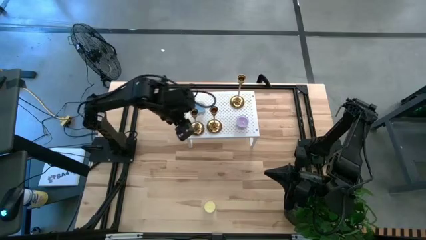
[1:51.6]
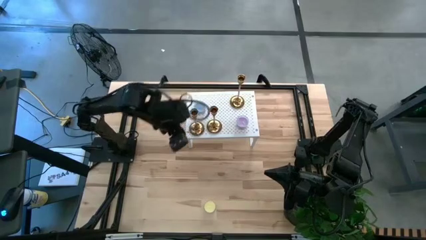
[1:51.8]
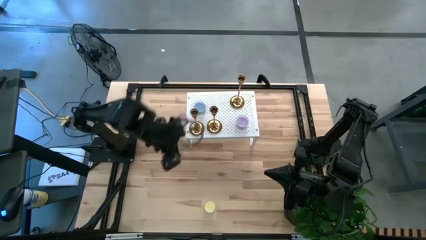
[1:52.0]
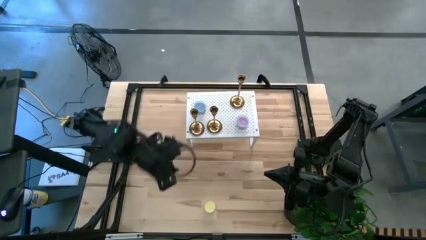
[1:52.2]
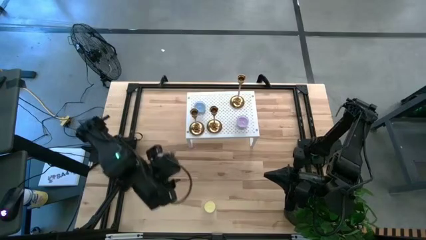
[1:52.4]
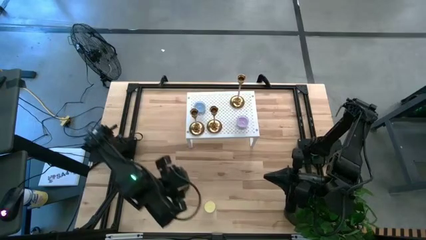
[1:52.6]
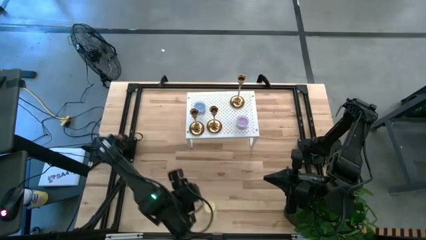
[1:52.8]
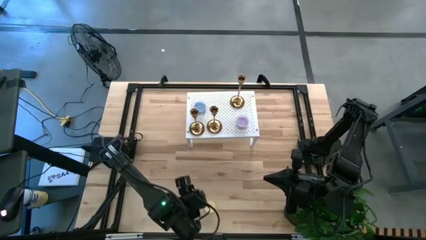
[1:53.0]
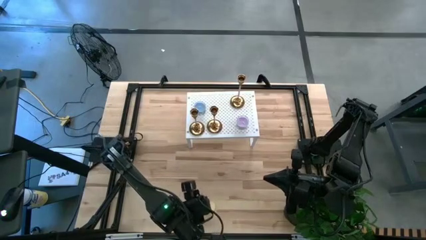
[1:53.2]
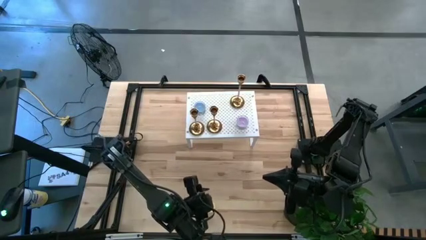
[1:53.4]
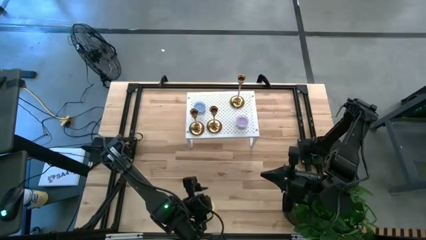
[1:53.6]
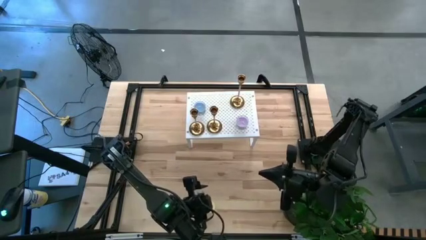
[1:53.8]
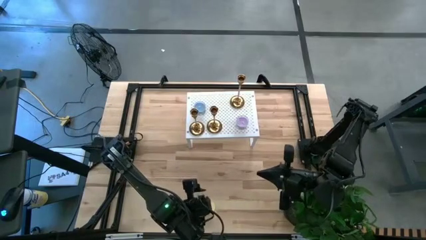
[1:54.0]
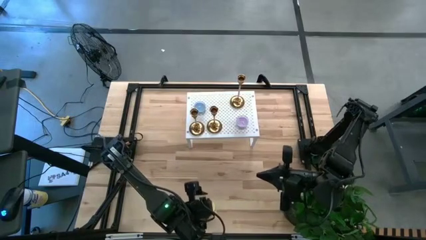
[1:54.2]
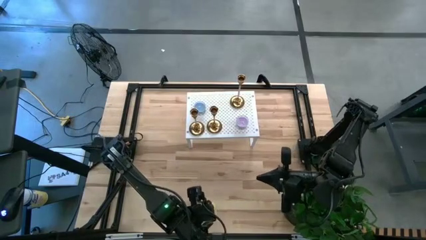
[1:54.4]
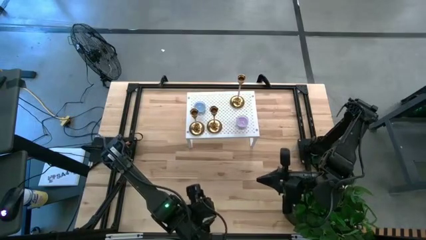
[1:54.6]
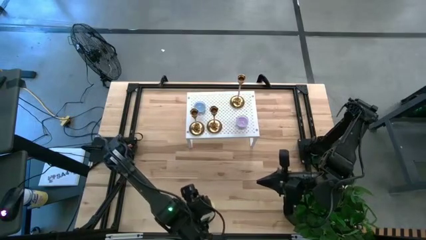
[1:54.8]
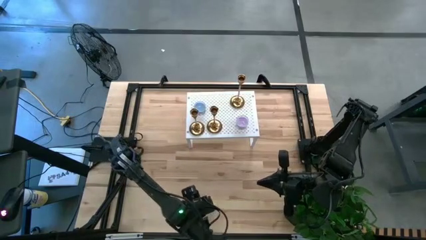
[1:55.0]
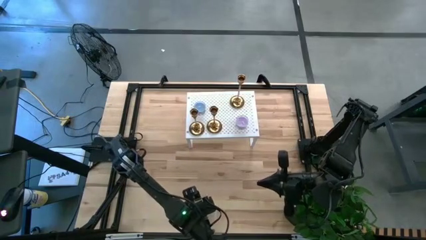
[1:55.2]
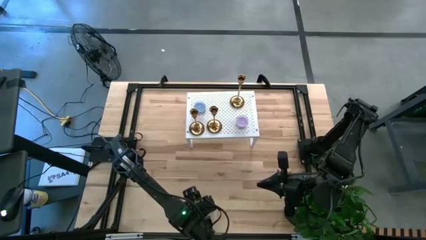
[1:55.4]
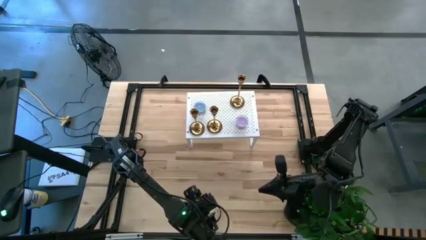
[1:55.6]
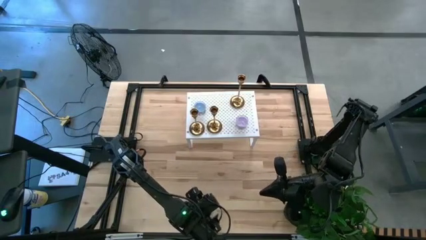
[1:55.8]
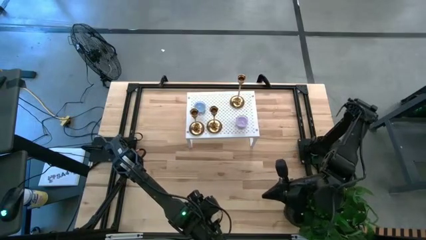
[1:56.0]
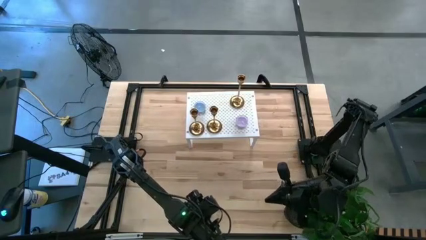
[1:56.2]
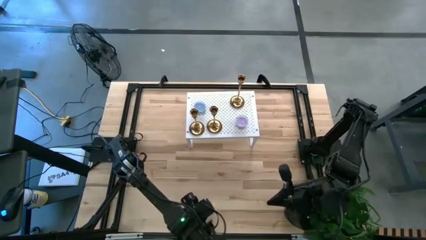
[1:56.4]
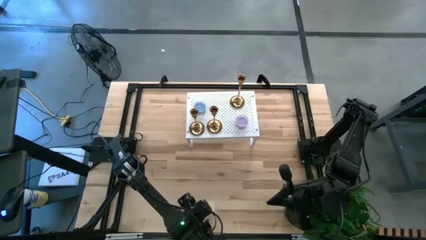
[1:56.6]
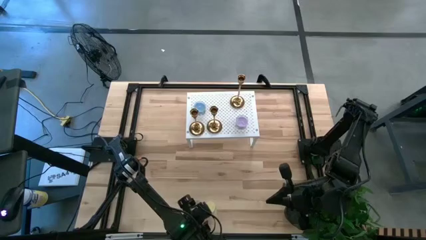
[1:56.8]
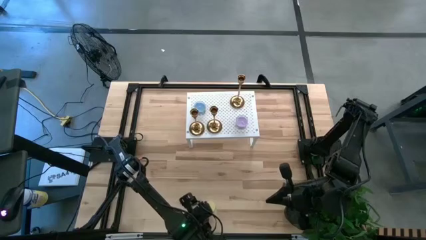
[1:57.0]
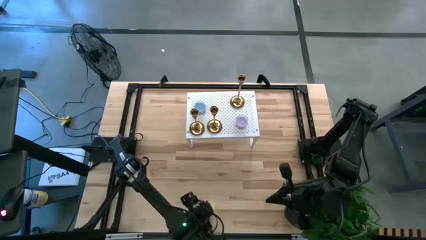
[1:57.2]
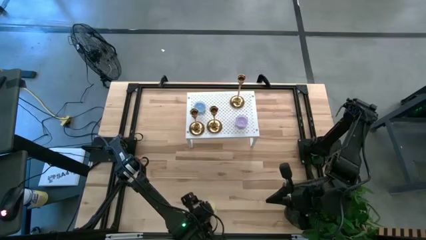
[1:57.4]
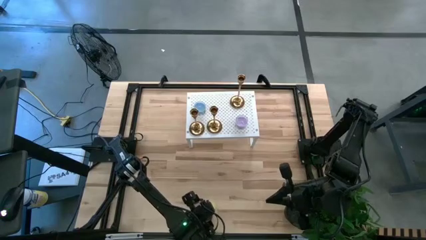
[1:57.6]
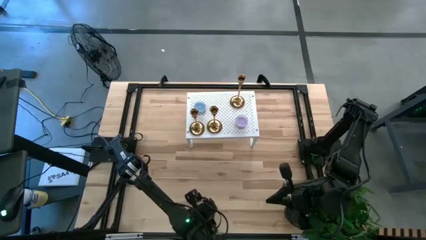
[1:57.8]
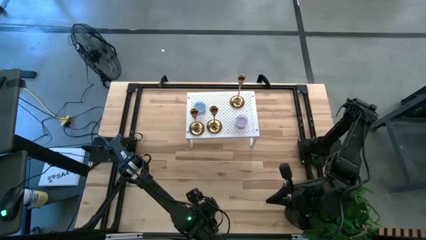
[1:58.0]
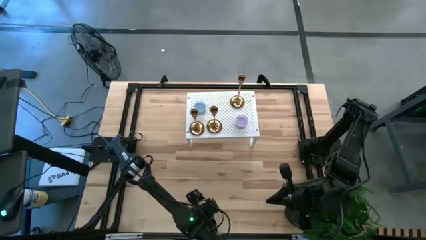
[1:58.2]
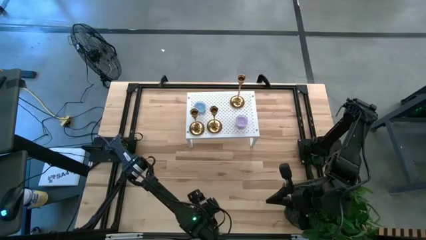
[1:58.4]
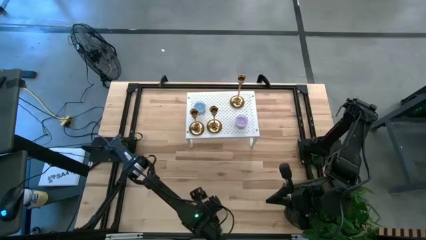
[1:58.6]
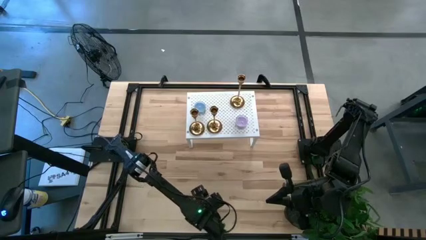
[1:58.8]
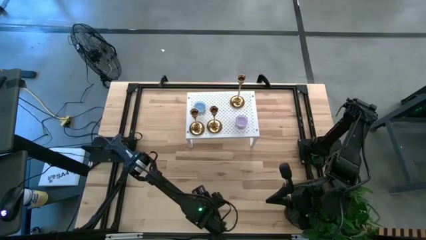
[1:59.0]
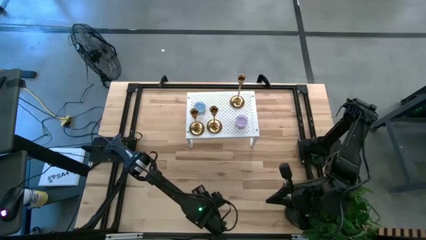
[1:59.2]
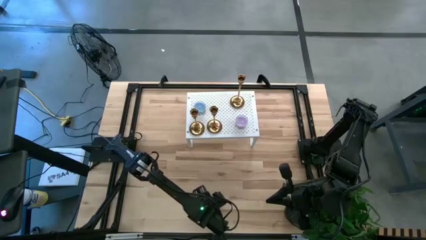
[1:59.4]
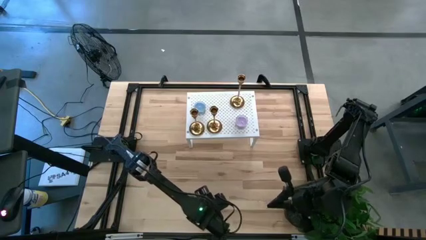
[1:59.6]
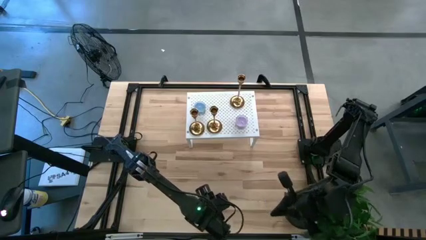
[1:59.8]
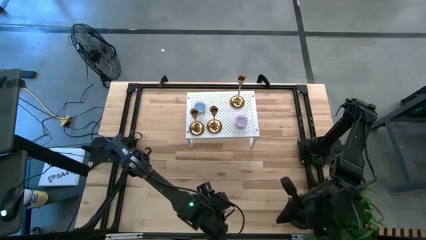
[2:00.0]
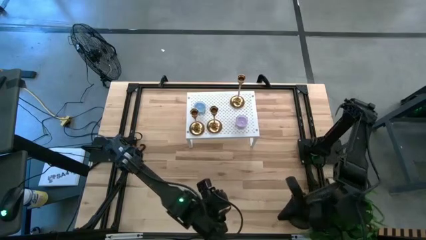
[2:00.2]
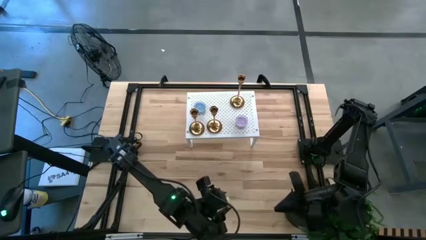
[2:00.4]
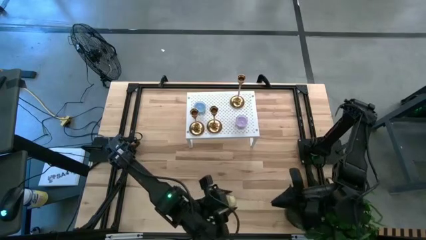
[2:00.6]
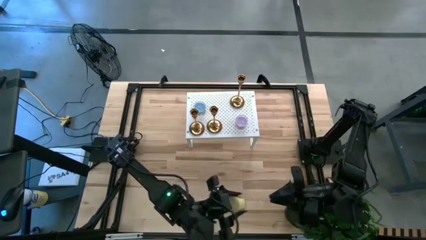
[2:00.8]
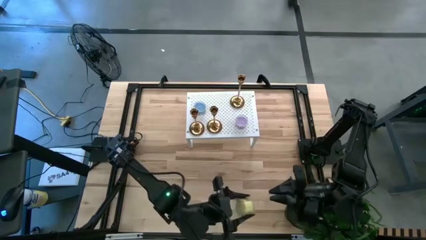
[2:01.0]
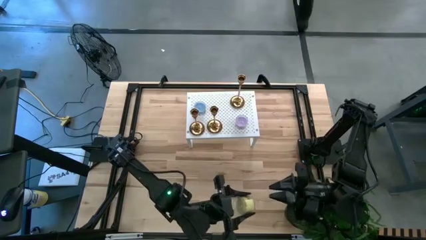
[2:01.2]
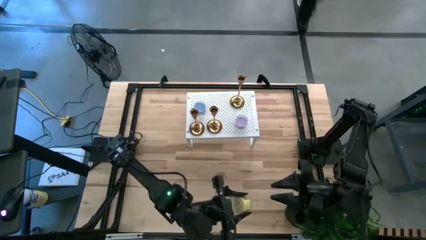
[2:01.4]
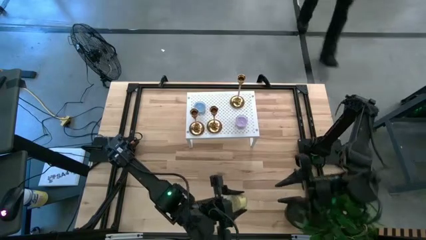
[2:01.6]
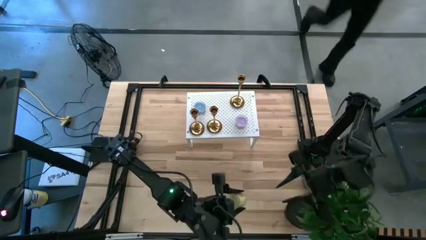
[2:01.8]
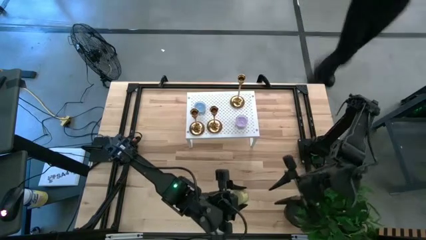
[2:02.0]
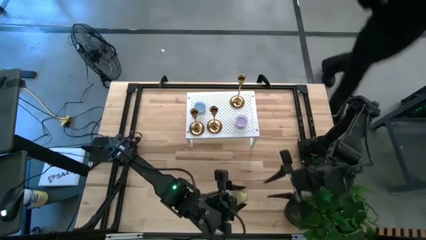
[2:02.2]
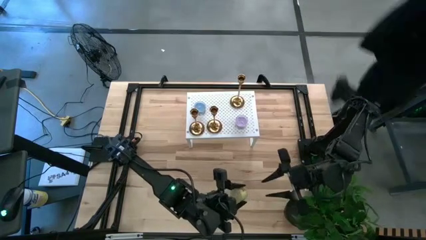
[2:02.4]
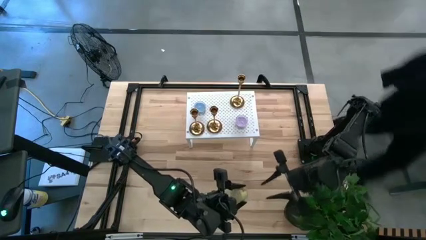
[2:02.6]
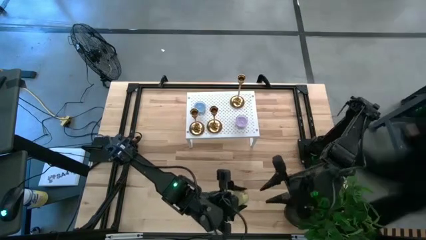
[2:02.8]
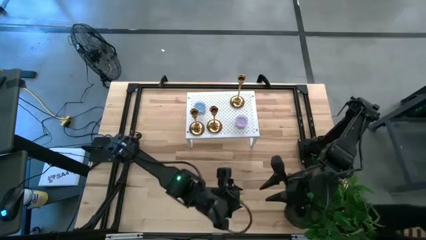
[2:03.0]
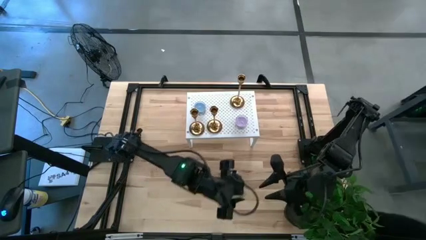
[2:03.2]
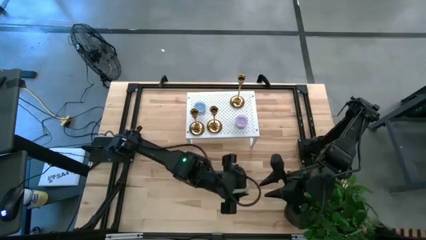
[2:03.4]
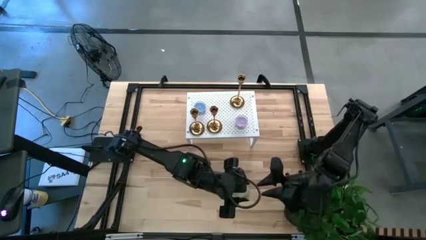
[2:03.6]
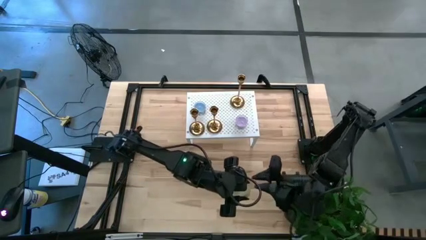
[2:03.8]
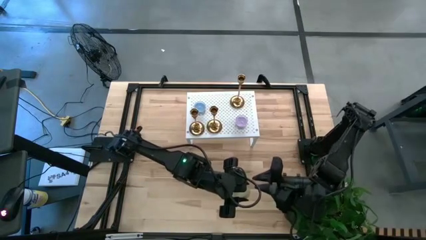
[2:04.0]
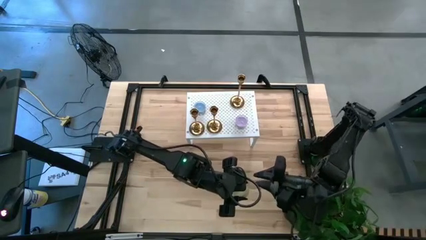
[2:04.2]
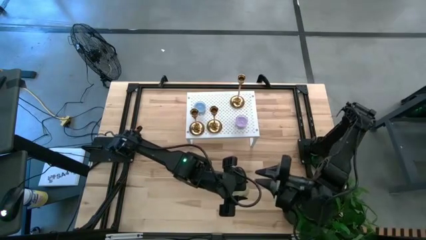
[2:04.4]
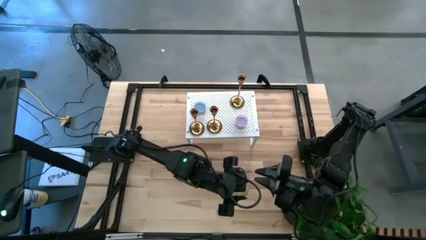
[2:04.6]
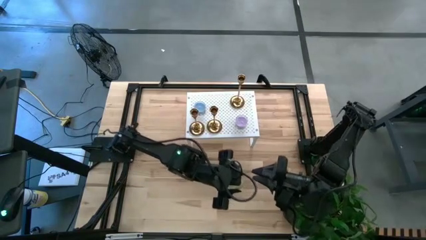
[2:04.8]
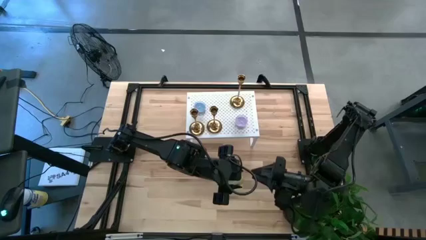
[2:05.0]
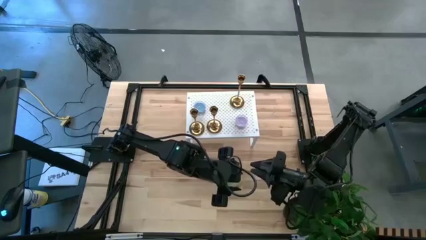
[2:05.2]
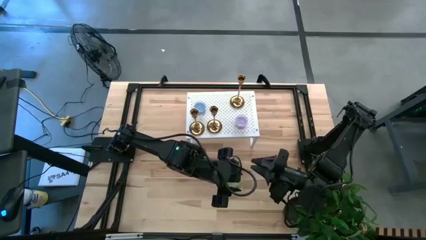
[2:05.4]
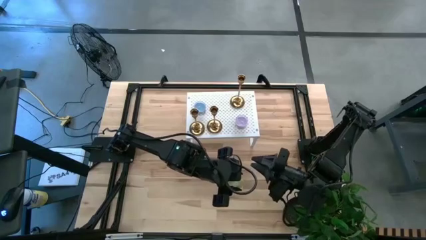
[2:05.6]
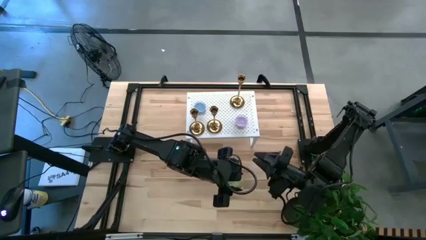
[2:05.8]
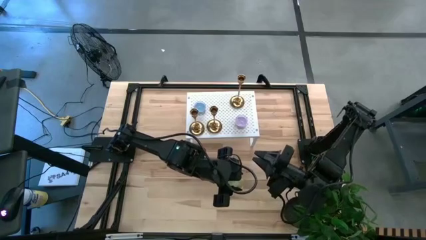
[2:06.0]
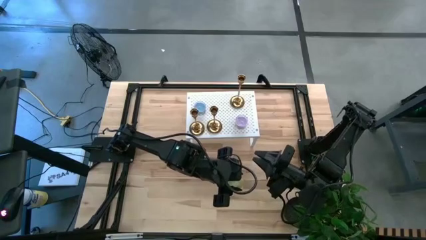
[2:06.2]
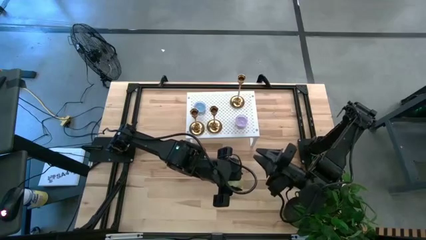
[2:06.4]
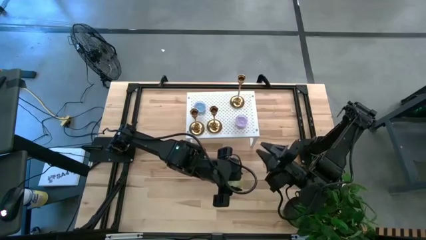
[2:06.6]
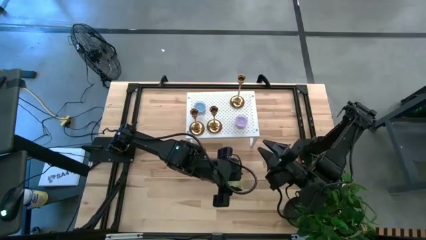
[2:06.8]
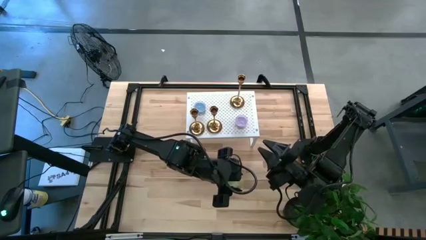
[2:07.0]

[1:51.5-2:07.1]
Task: Pick & Place candle stick holders
Put the yellow scented candle on the shelf
